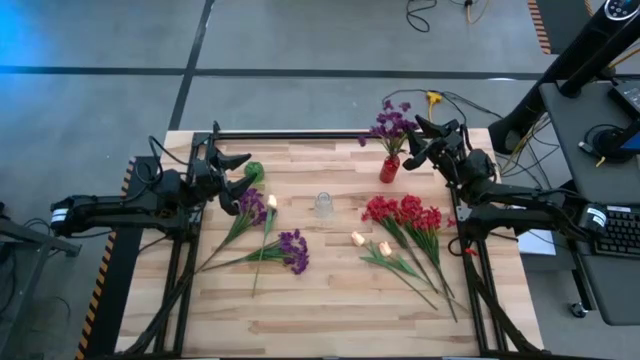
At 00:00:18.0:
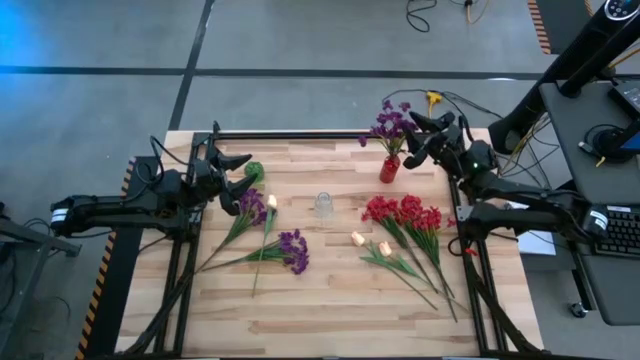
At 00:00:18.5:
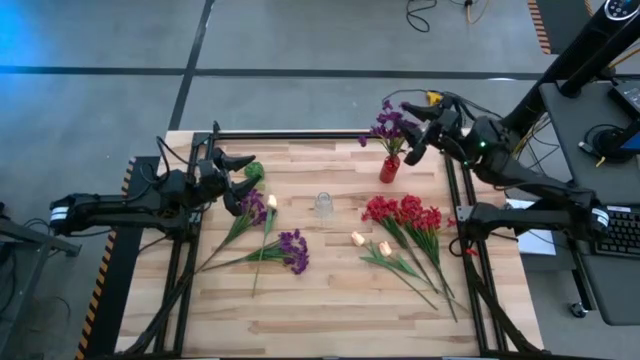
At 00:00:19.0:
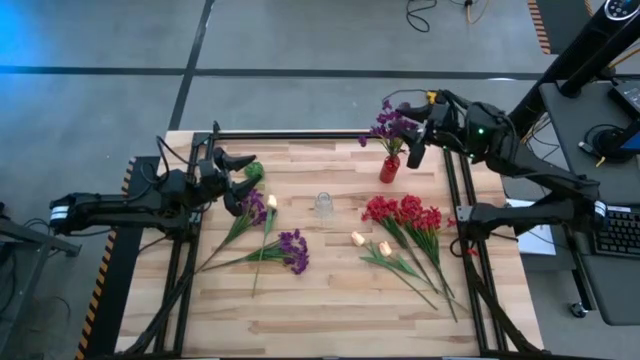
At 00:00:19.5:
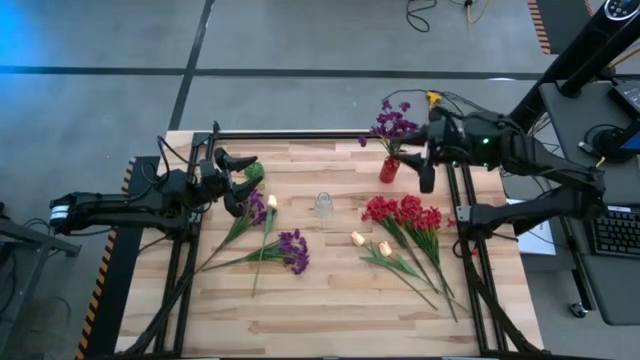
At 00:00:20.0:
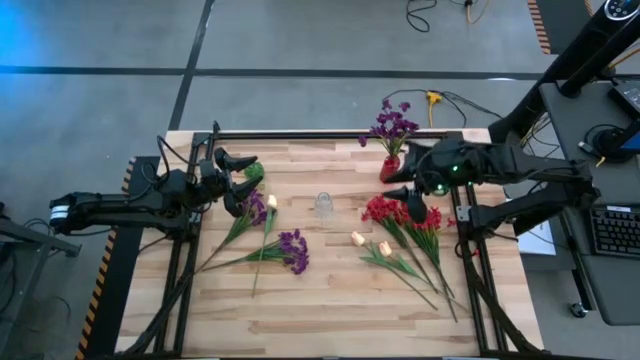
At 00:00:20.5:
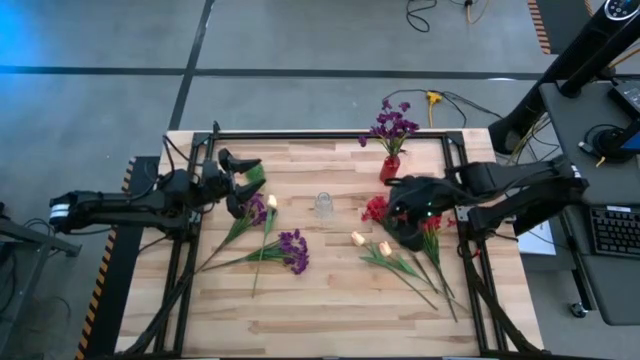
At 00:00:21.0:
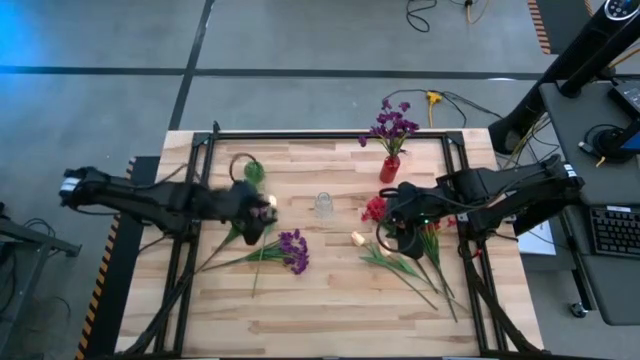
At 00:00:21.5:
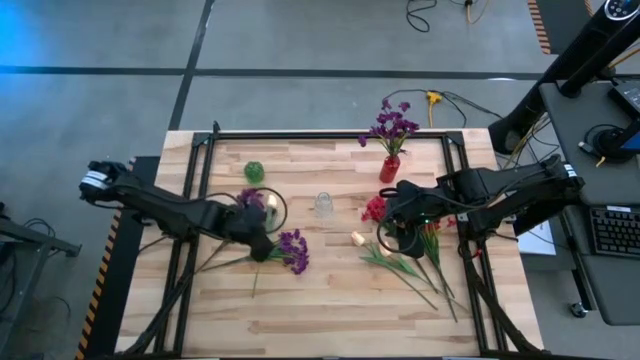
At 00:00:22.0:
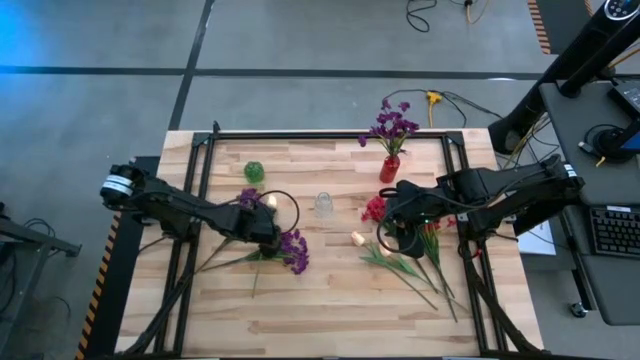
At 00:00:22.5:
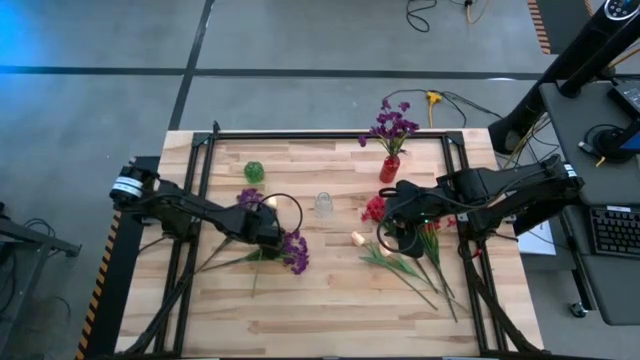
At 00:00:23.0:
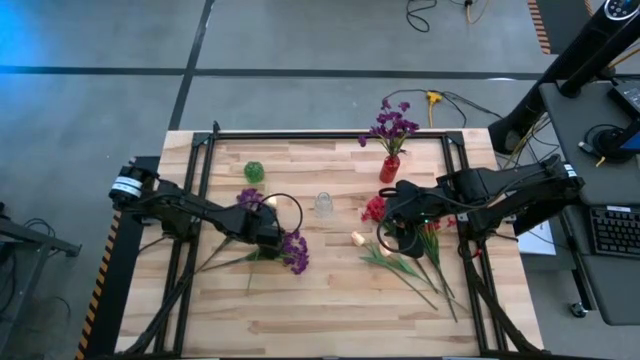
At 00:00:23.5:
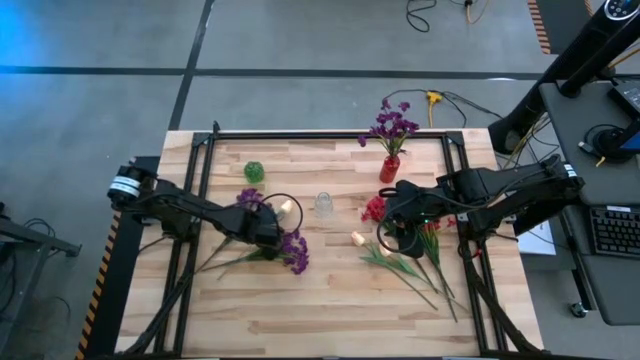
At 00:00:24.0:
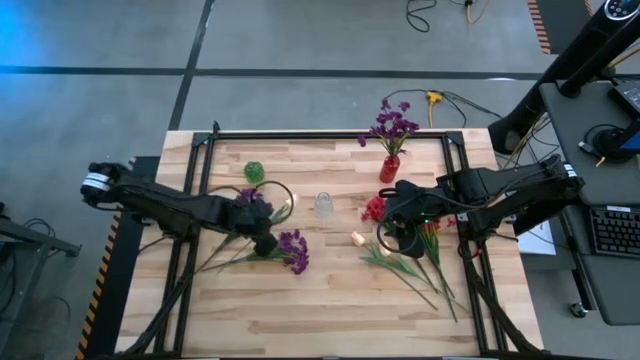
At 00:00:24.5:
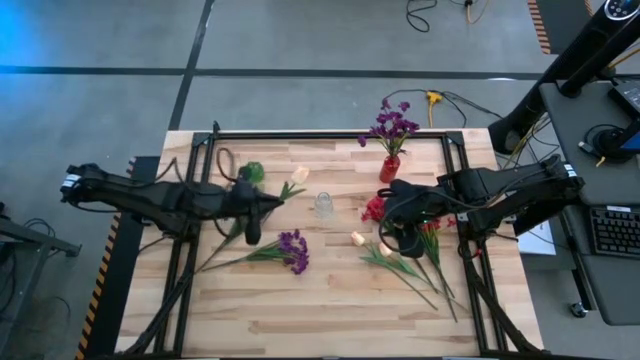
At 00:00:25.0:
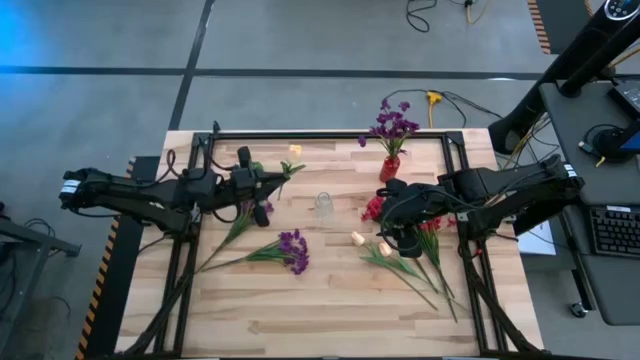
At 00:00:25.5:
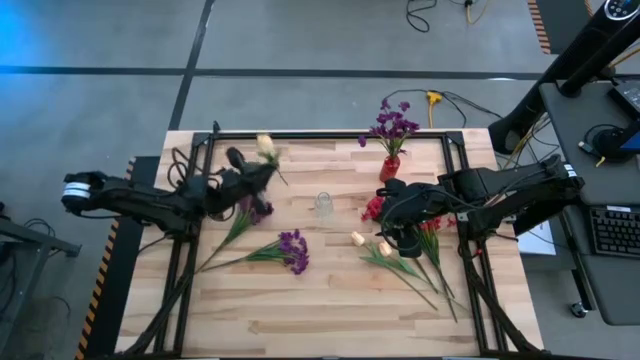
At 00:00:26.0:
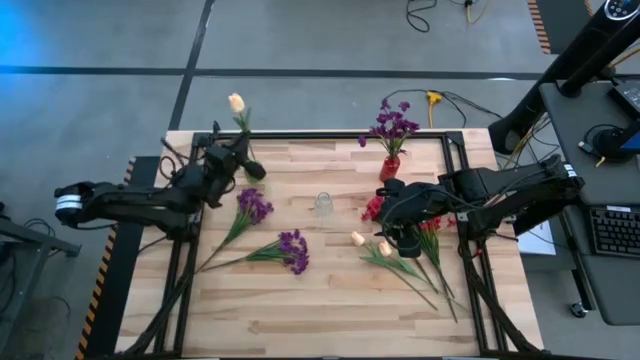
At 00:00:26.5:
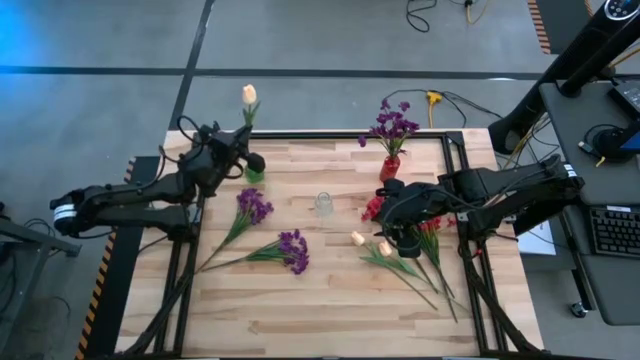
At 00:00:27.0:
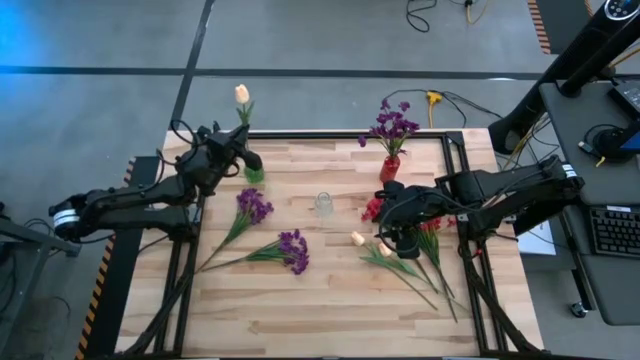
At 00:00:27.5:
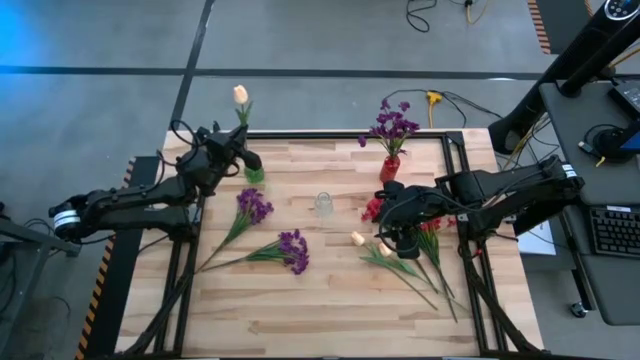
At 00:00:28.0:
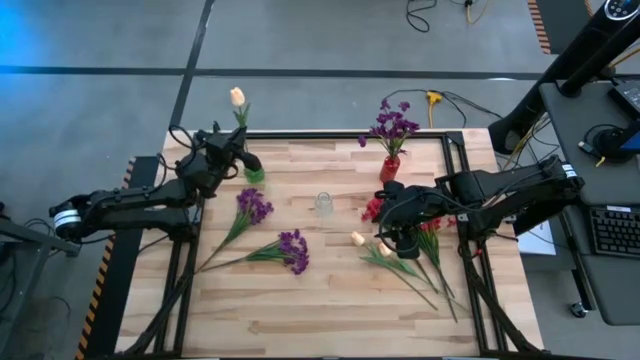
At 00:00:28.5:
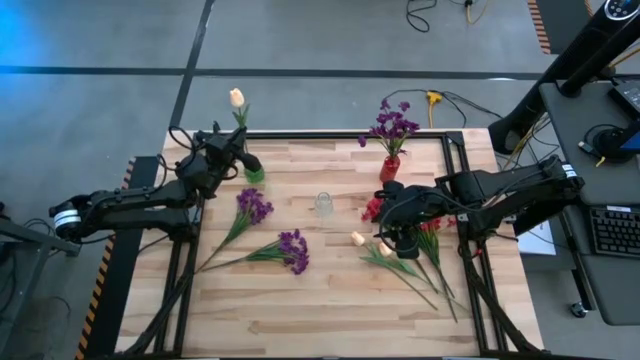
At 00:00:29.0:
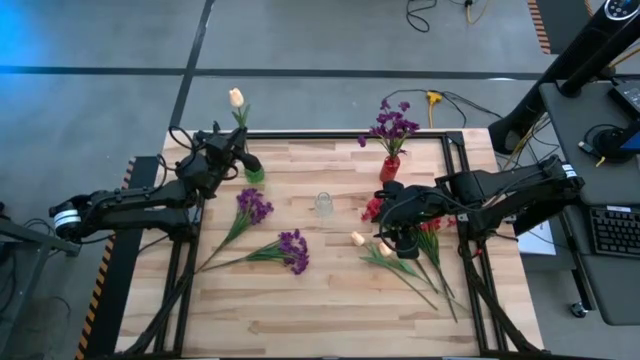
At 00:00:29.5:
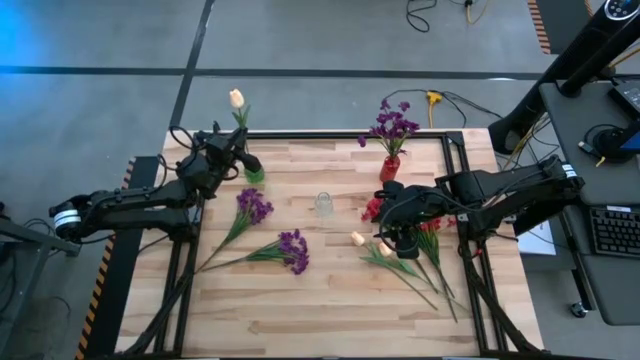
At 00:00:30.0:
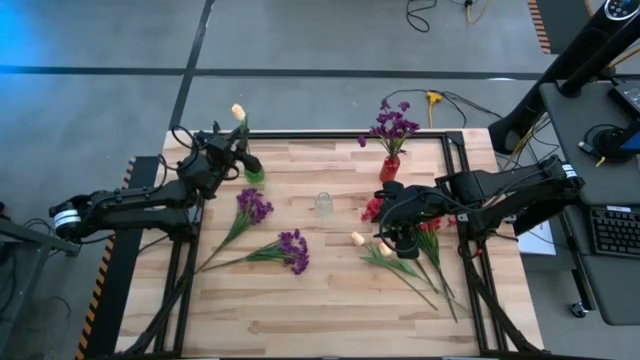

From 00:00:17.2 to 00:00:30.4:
Task: Sort flowers into vase by color
Put the top pink flowers into the green vase
